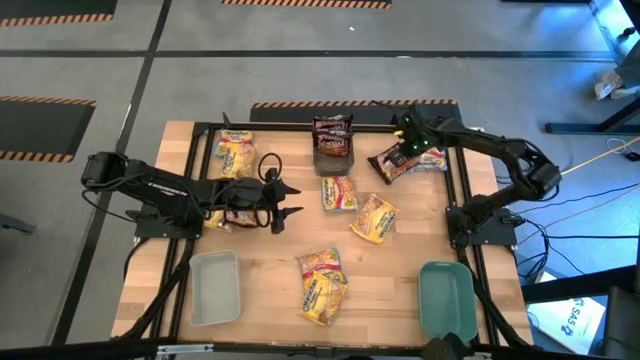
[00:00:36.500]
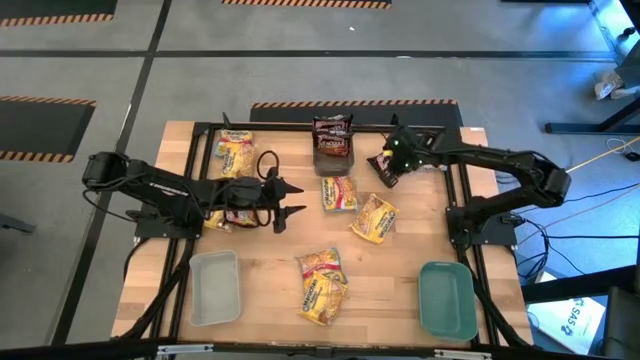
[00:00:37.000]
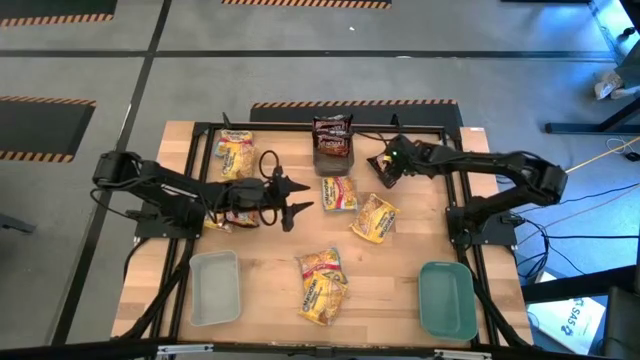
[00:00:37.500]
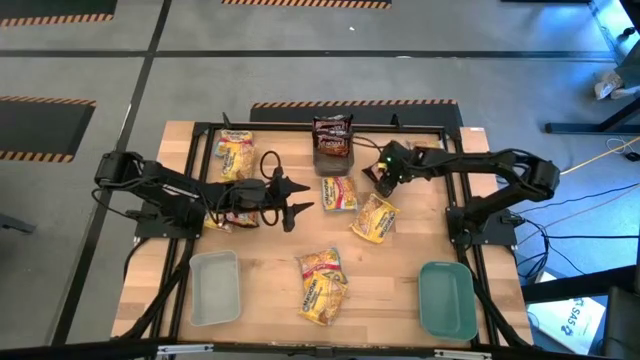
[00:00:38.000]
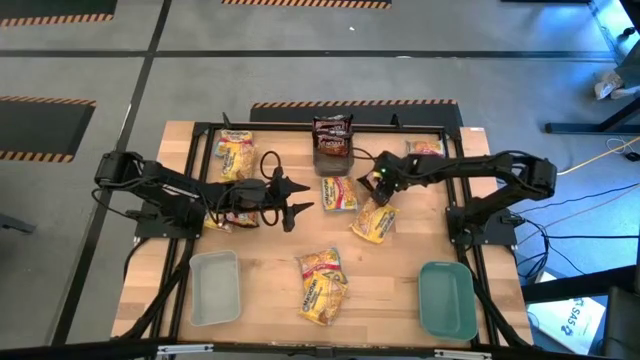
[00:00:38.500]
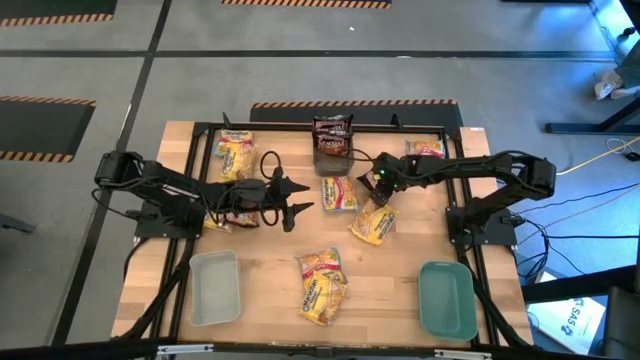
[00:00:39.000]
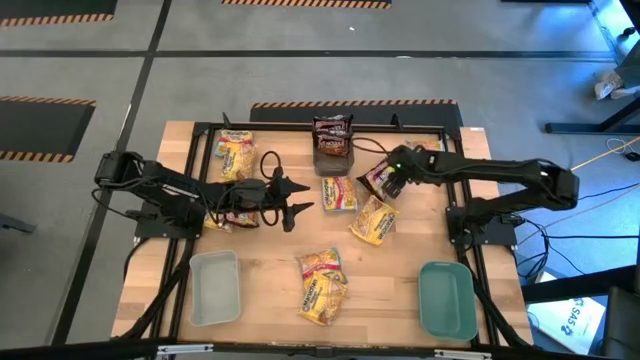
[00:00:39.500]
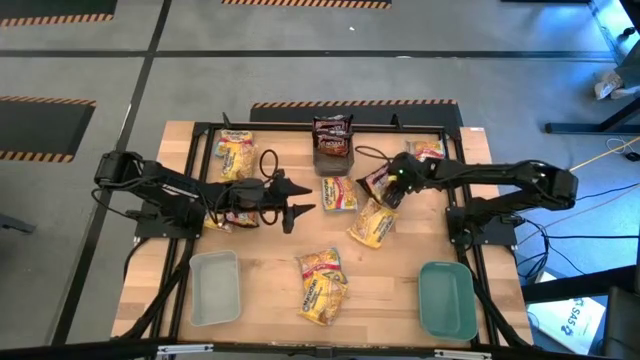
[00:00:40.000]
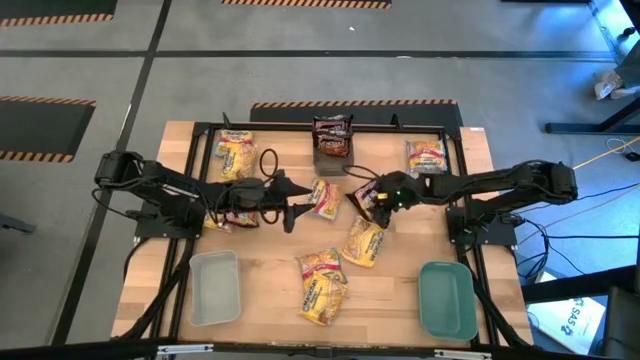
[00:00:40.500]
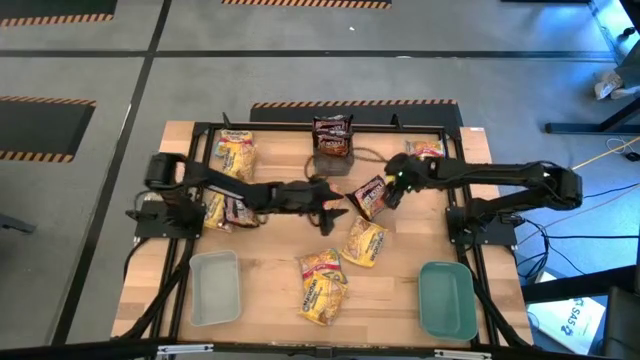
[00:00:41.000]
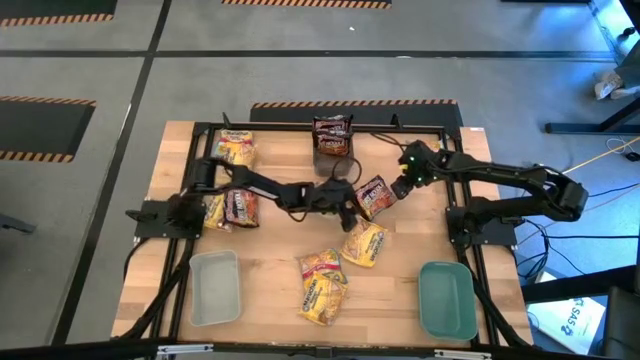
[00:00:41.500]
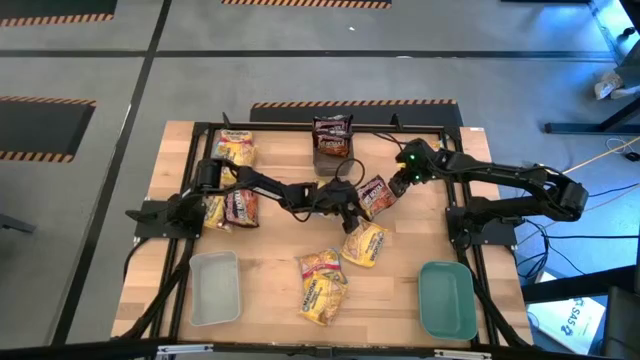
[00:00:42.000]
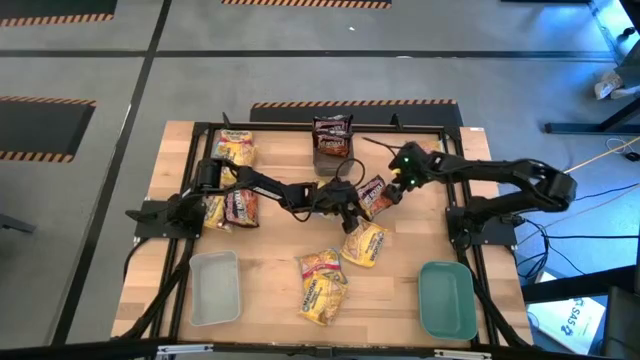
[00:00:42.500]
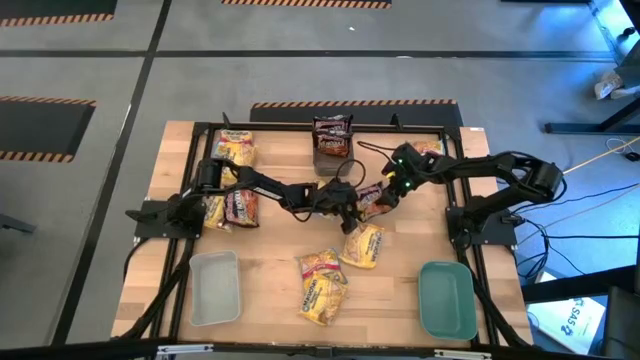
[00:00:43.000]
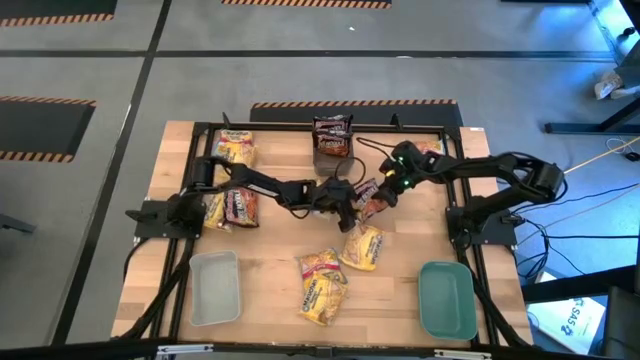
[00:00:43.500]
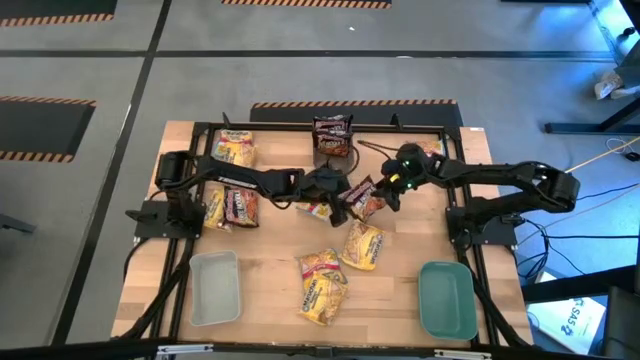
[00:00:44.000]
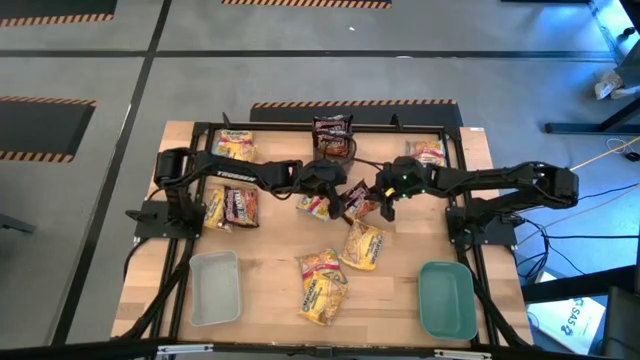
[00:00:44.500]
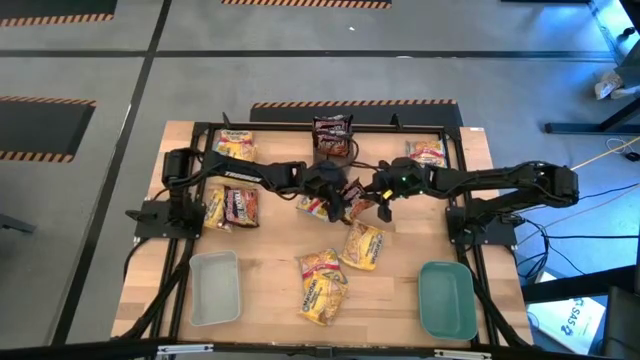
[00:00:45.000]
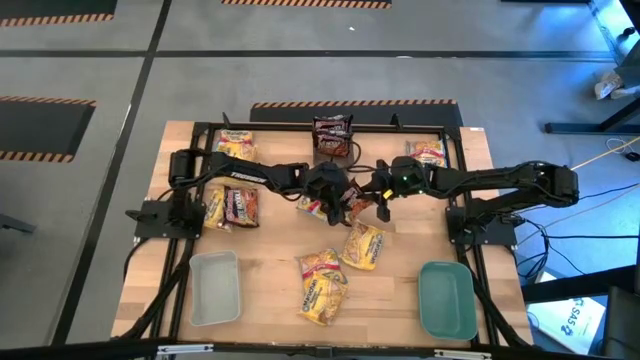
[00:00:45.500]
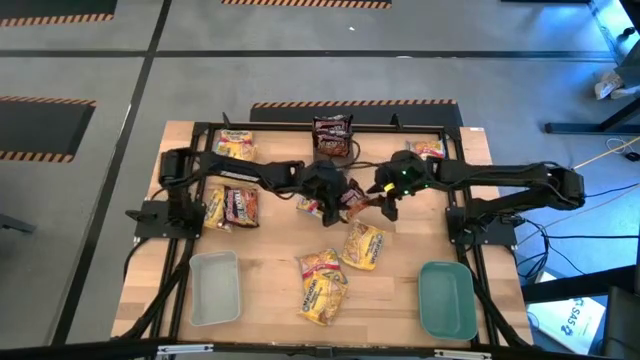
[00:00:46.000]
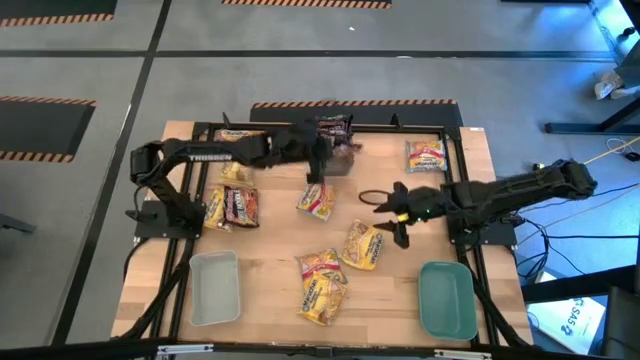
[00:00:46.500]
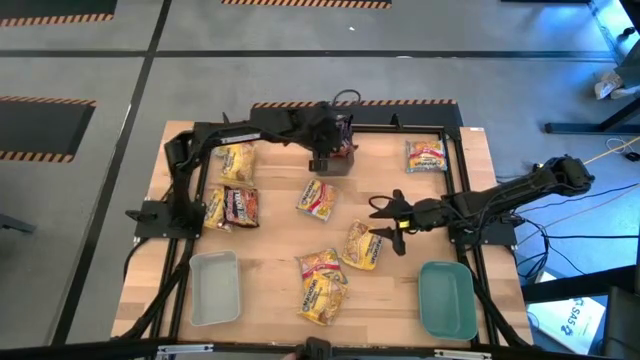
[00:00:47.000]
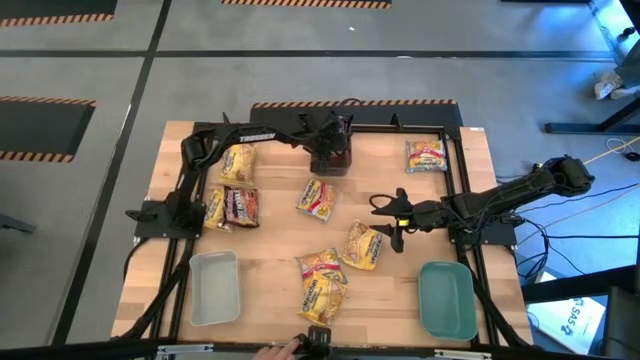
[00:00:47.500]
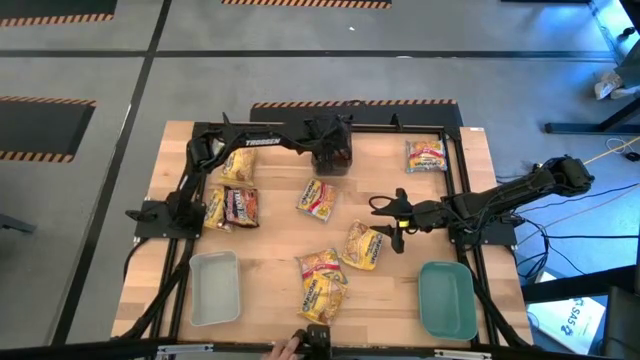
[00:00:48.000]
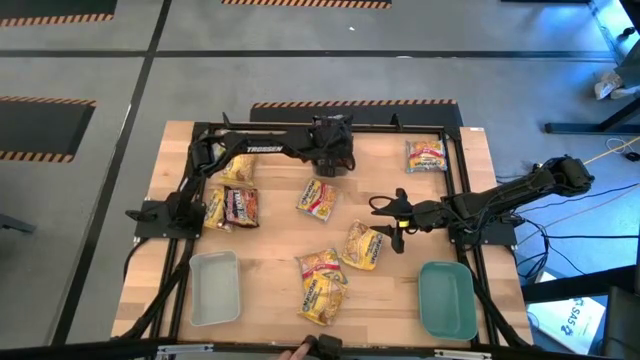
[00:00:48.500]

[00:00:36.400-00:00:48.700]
Task: Sort Maruchan noodles
Put the right black noodle pack into the black bin

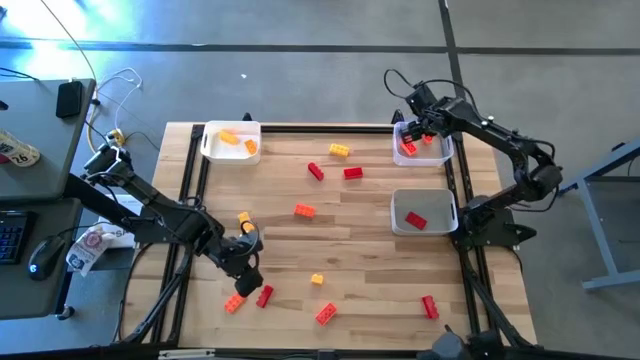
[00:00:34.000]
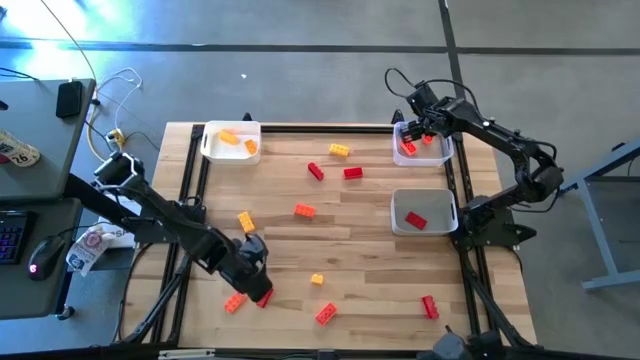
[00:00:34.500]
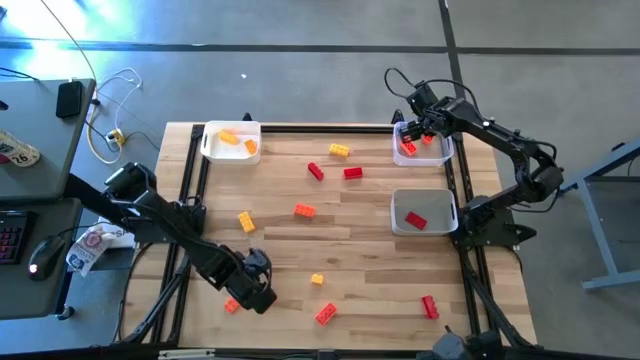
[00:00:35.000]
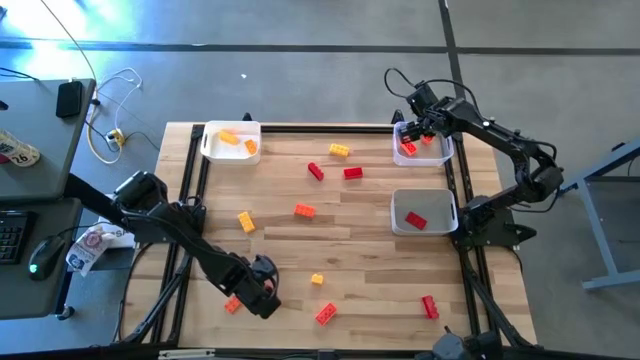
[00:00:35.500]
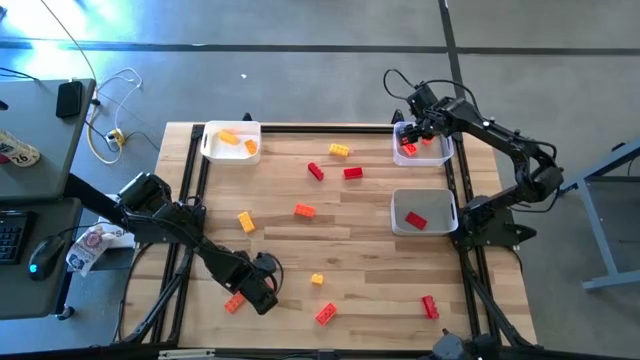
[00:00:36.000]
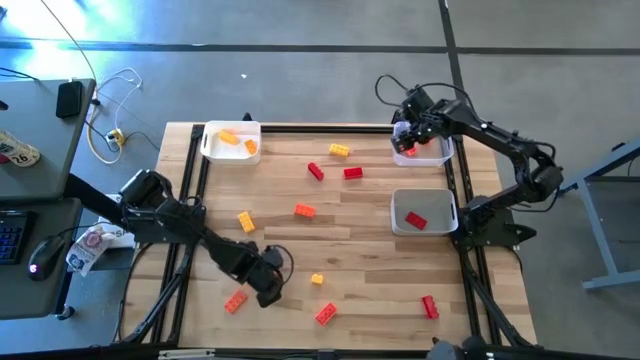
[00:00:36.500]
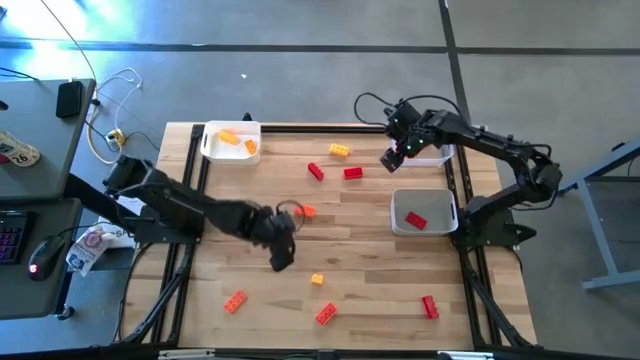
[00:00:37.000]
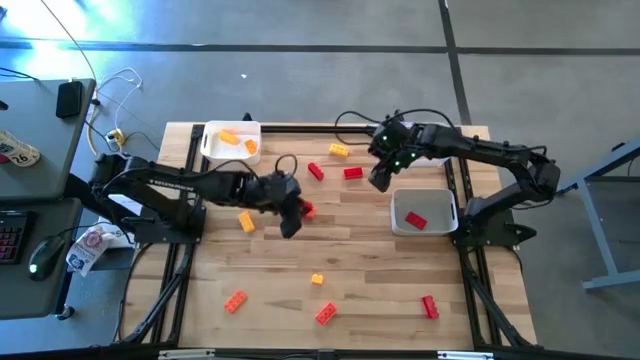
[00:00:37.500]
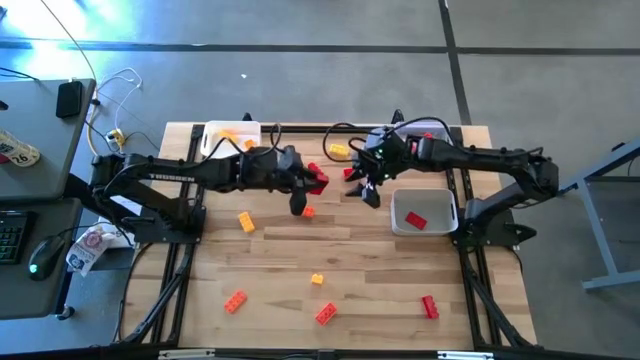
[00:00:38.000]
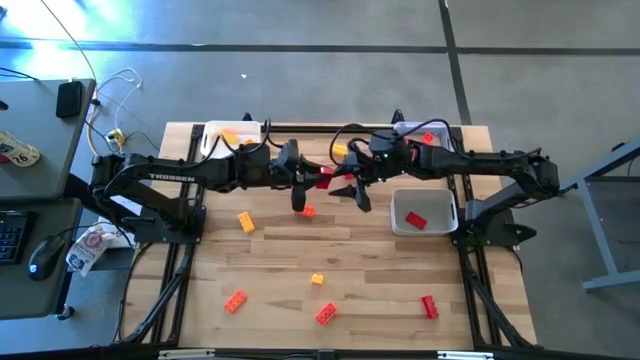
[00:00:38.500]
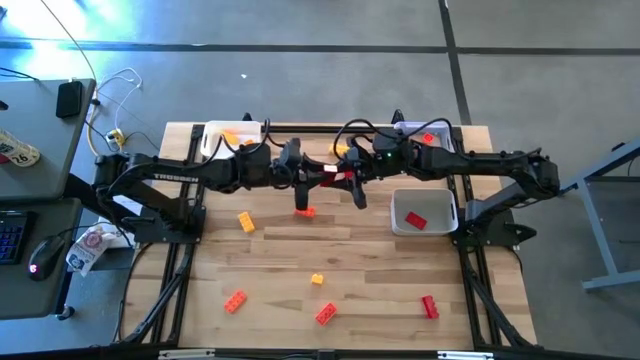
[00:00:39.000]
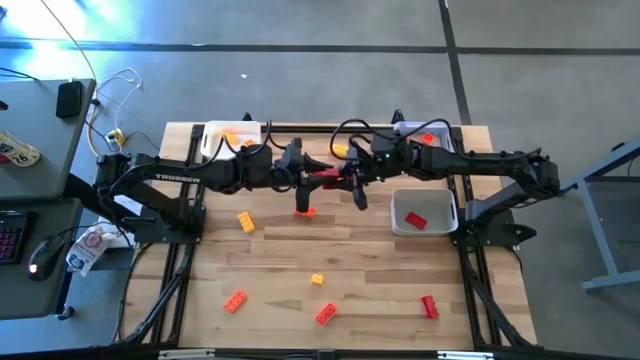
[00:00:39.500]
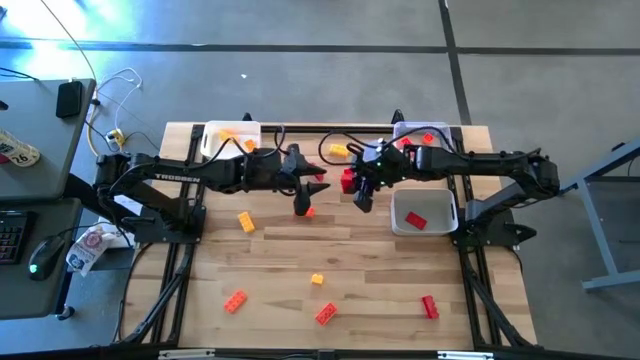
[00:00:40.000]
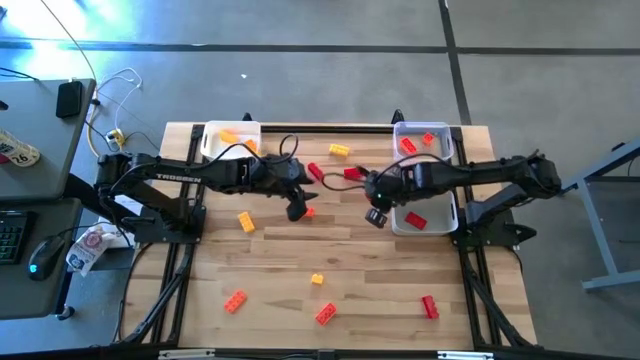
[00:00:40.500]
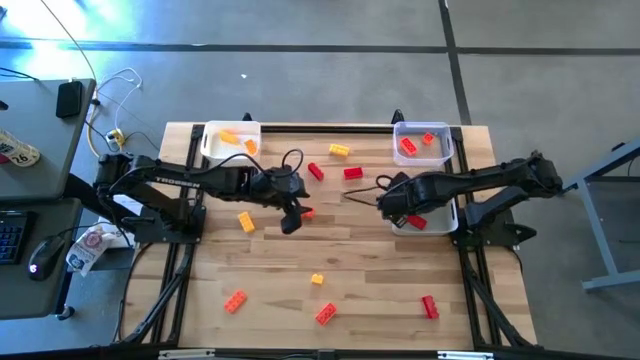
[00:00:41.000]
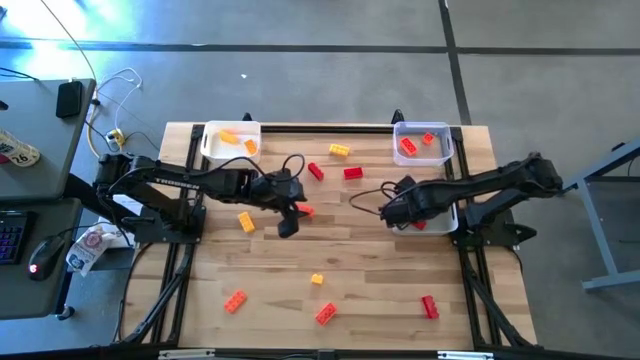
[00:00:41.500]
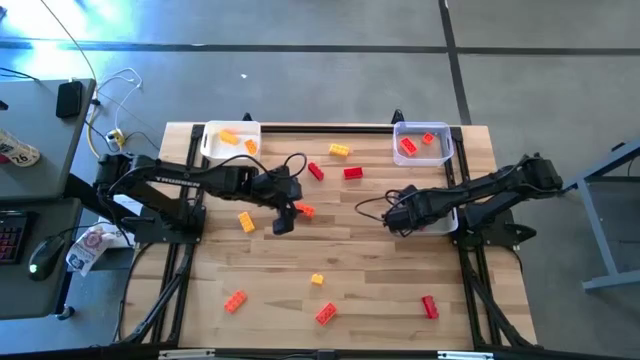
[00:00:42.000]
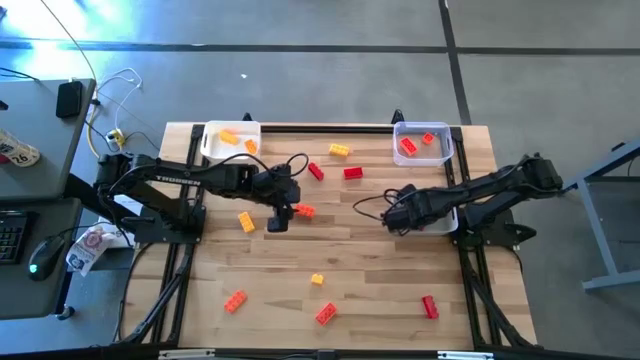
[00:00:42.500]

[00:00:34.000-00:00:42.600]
Task: Sort & place blocks by color
Put the red game piece into the gray bin
